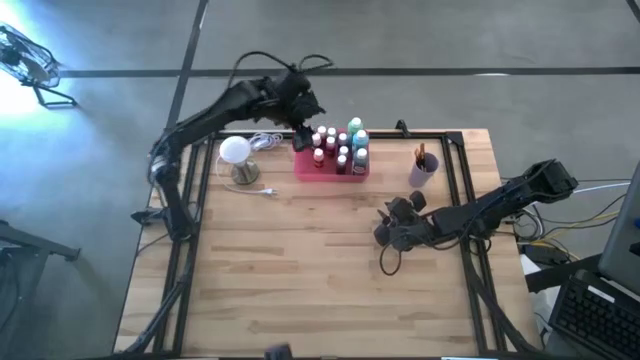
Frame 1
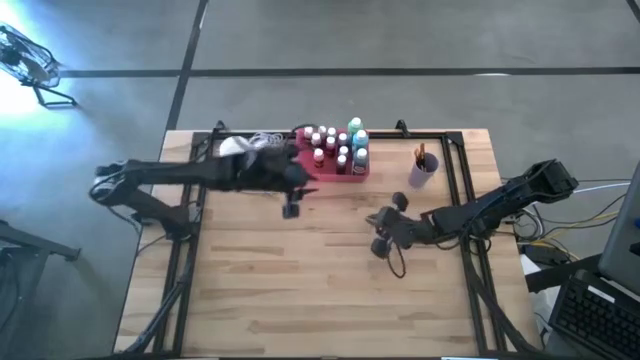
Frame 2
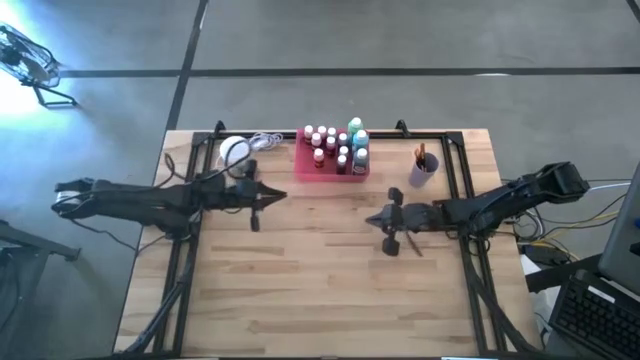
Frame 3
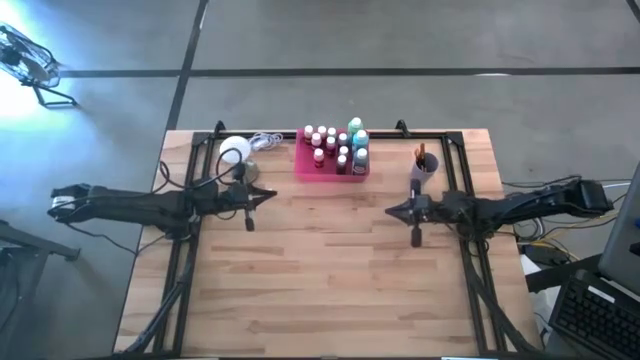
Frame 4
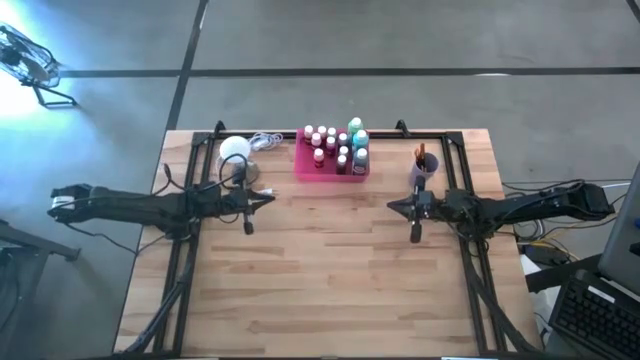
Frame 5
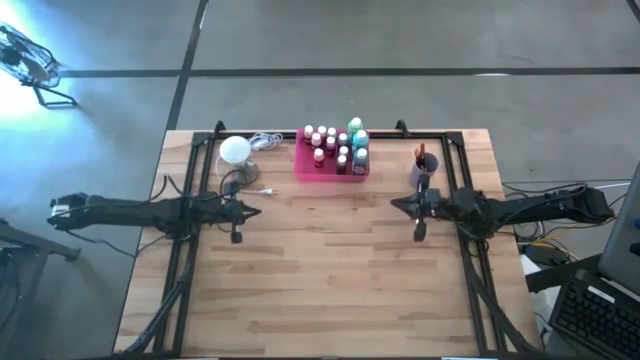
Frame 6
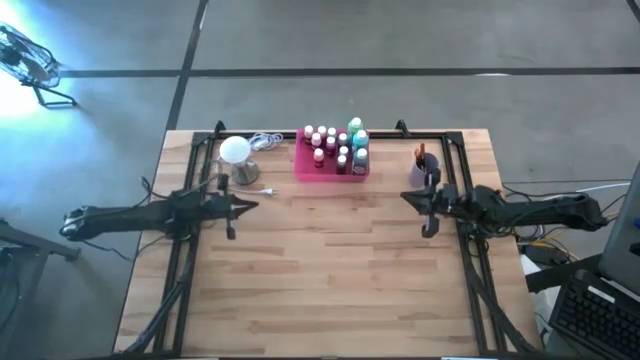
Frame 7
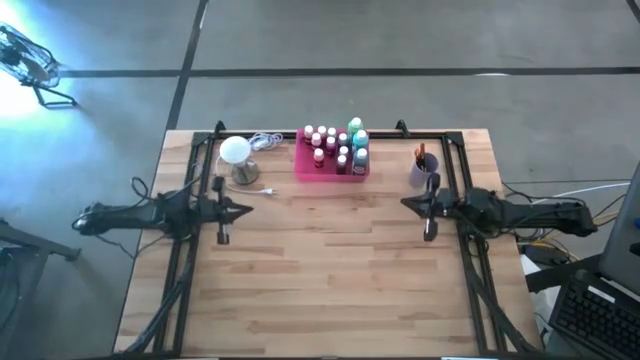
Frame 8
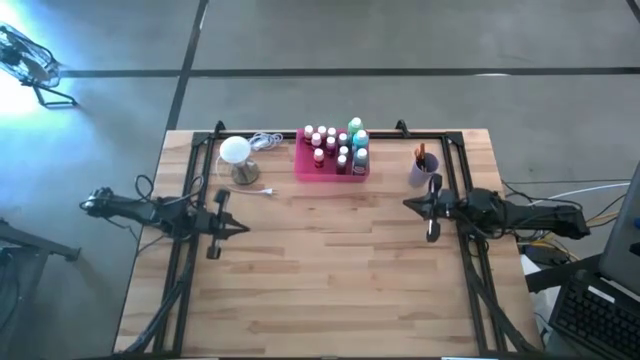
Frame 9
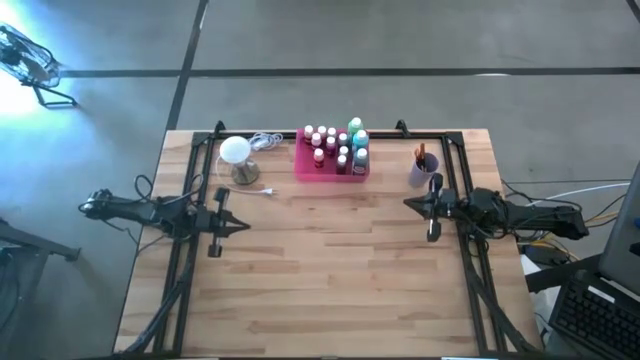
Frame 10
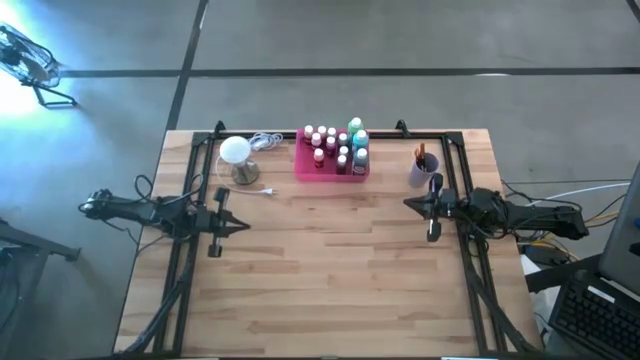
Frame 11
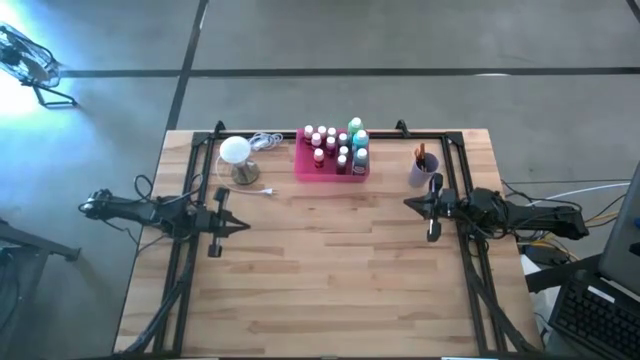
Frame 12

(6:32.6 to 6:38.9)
Task: Pick & Place Paint Supplies
Return to Home Position

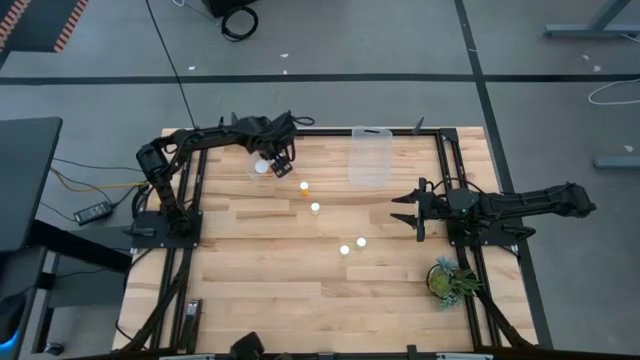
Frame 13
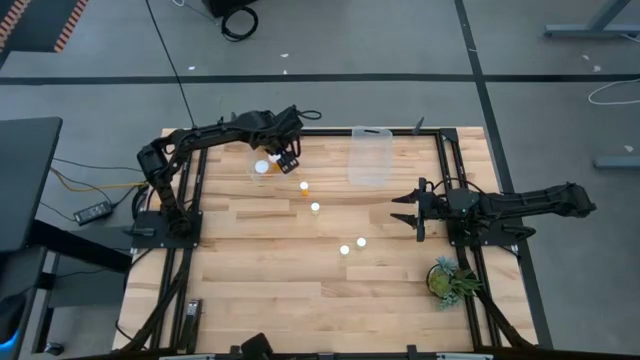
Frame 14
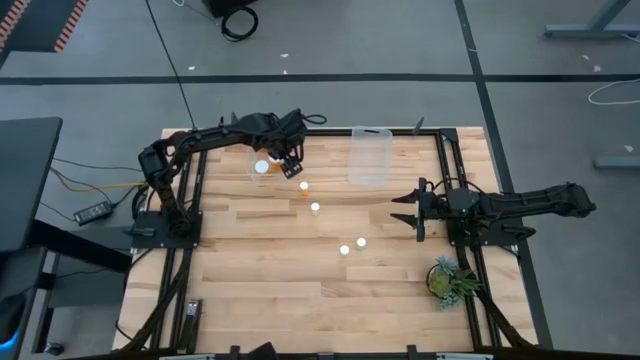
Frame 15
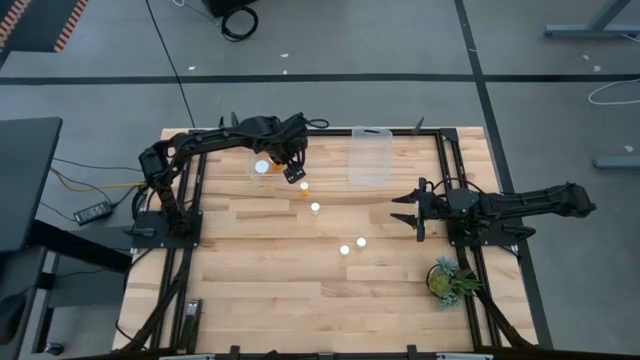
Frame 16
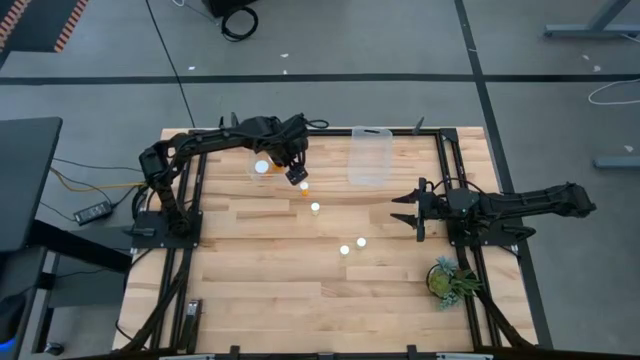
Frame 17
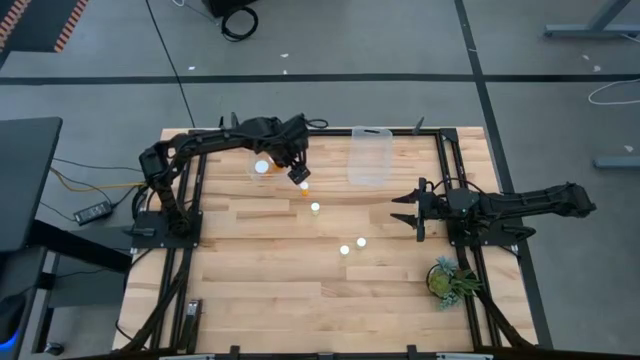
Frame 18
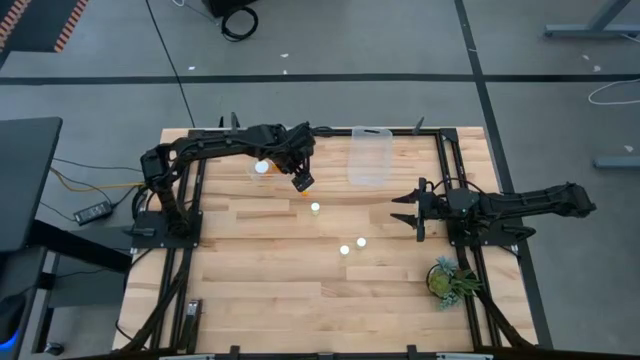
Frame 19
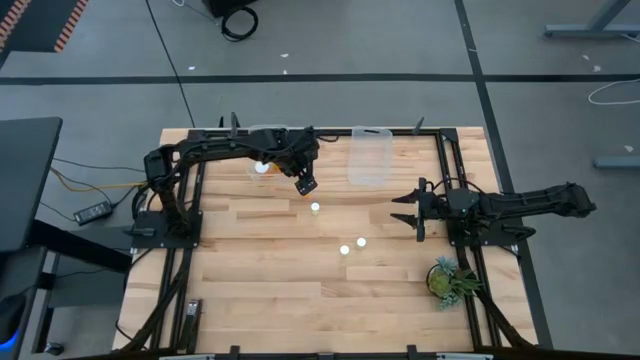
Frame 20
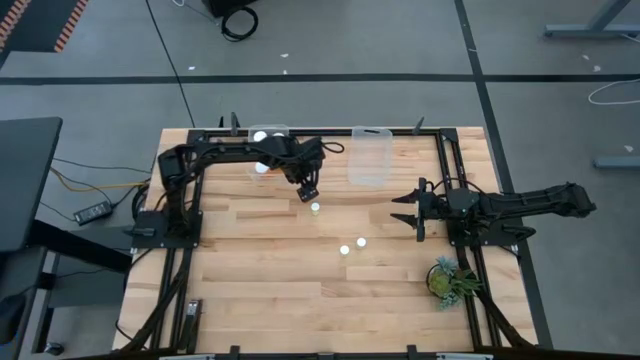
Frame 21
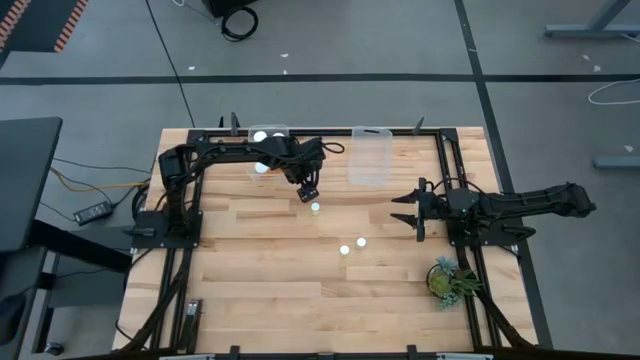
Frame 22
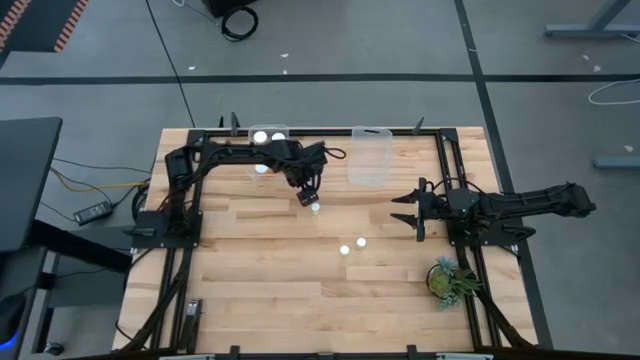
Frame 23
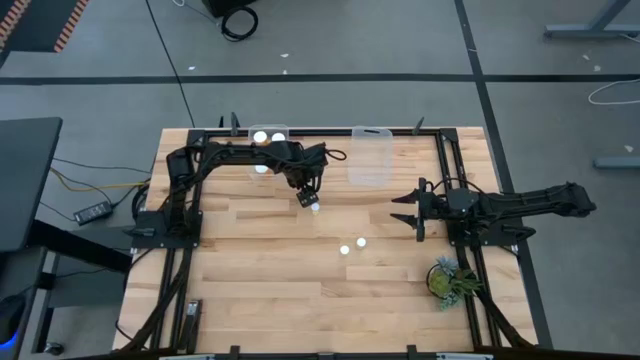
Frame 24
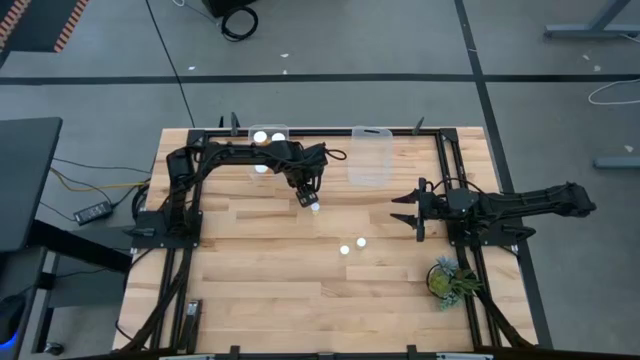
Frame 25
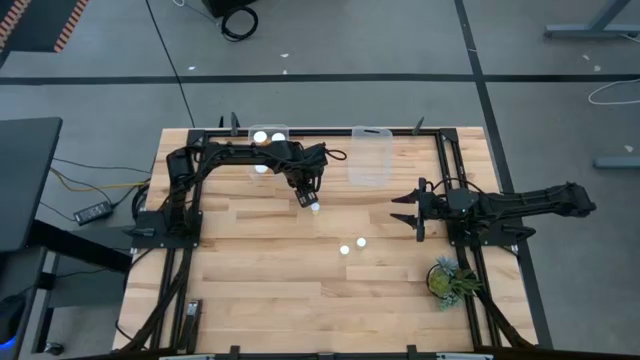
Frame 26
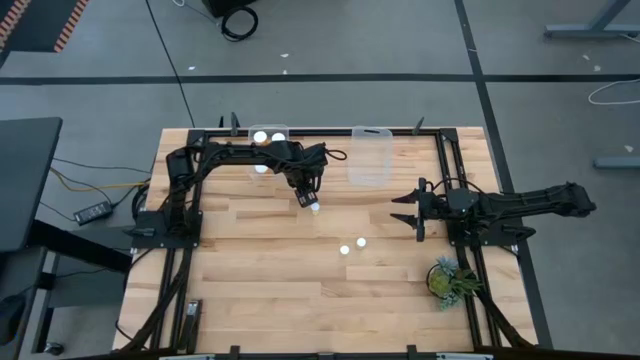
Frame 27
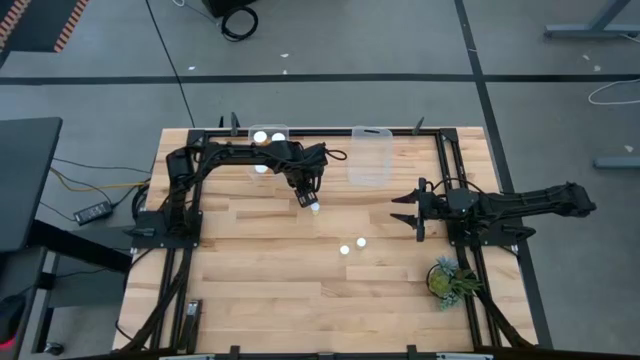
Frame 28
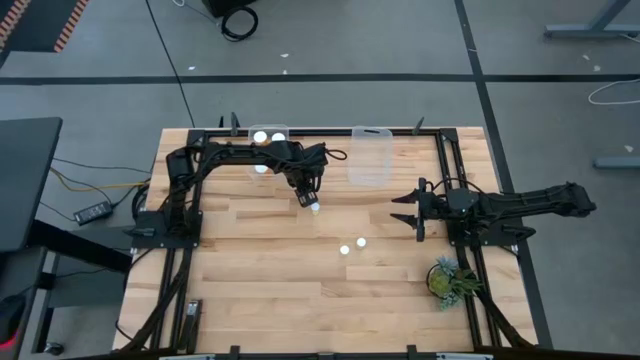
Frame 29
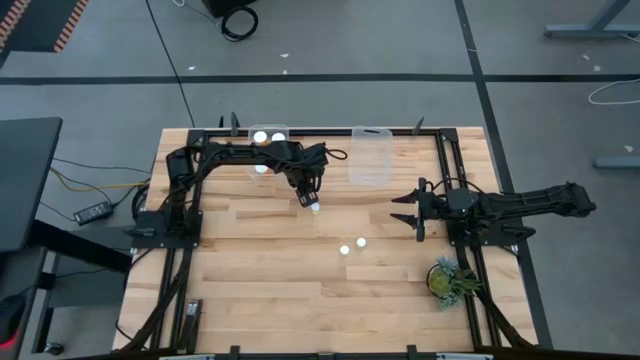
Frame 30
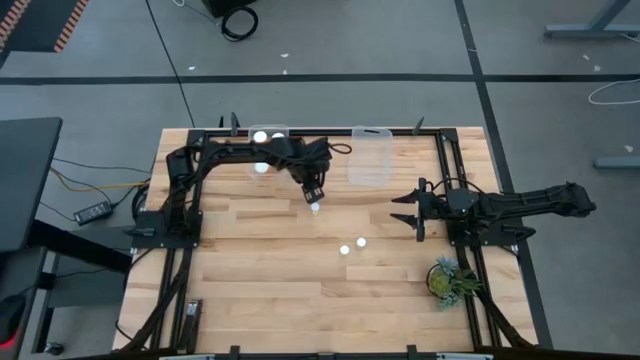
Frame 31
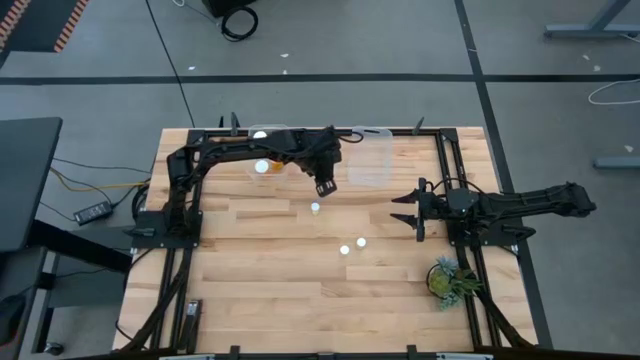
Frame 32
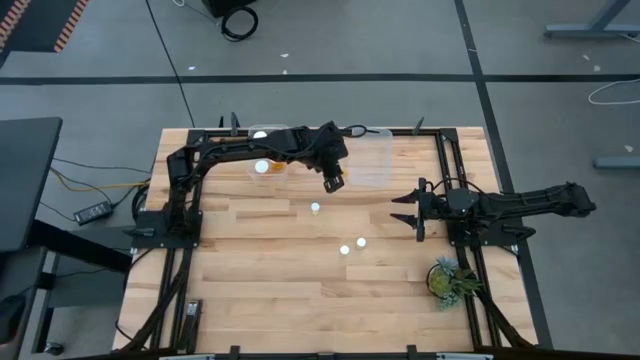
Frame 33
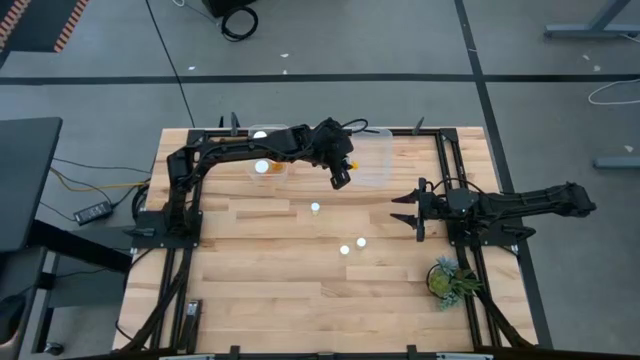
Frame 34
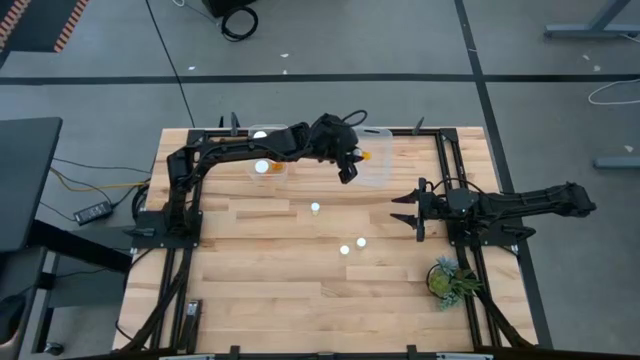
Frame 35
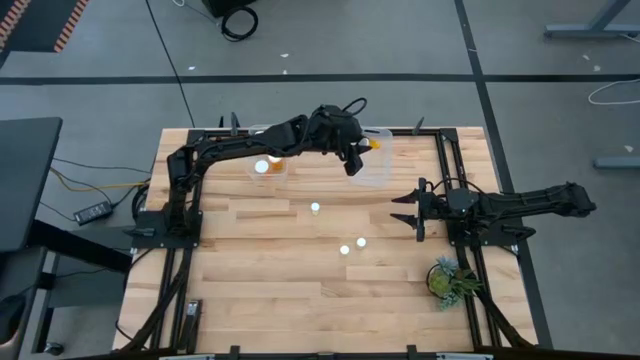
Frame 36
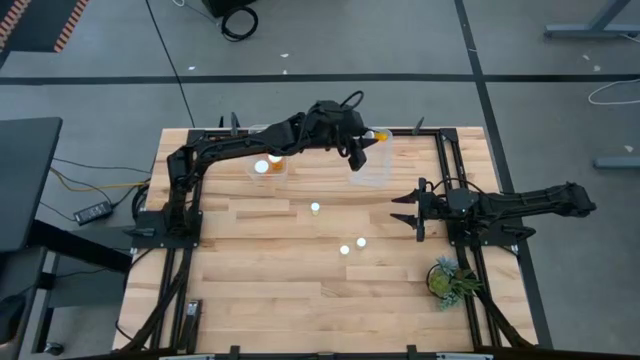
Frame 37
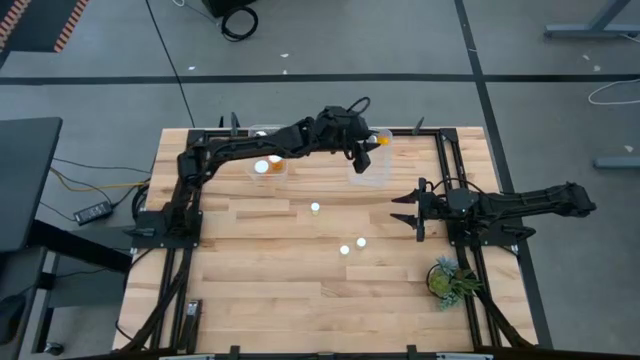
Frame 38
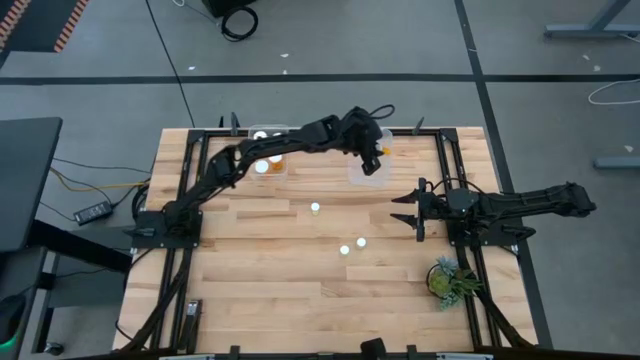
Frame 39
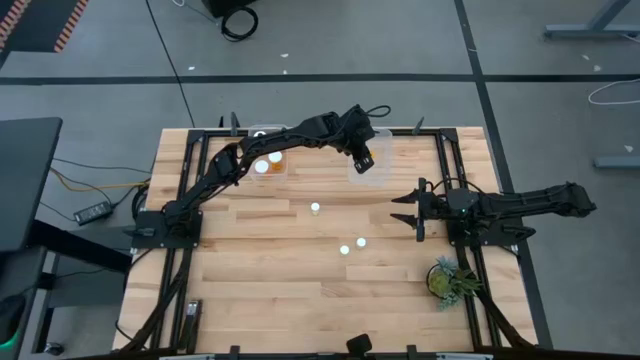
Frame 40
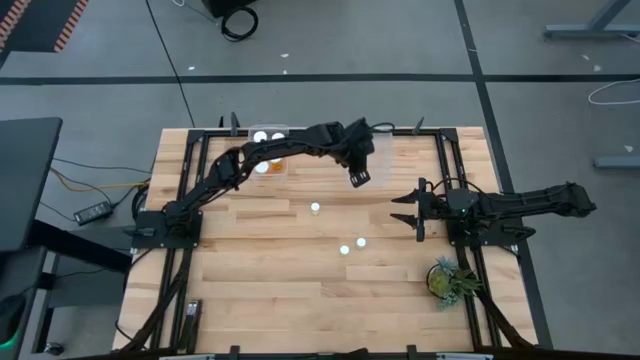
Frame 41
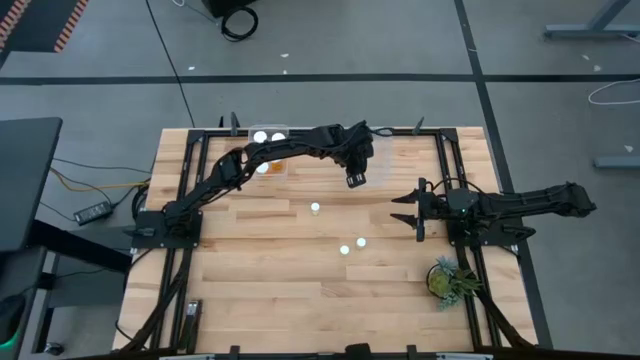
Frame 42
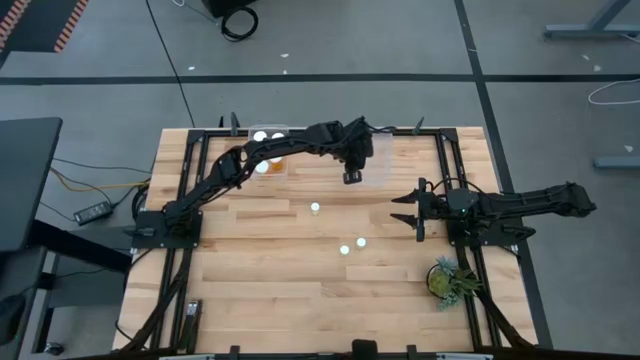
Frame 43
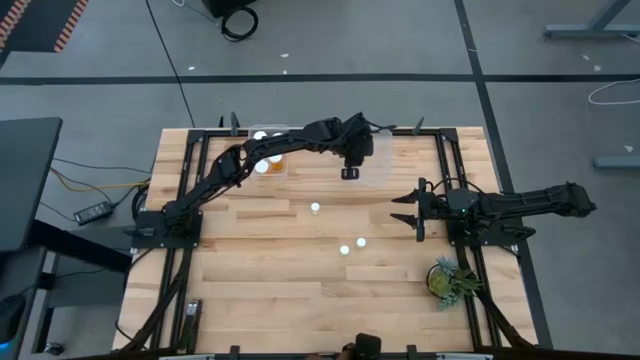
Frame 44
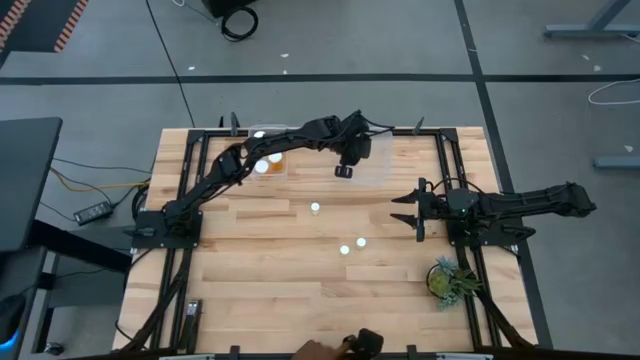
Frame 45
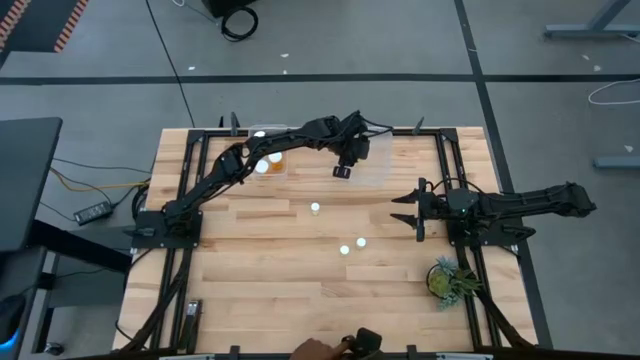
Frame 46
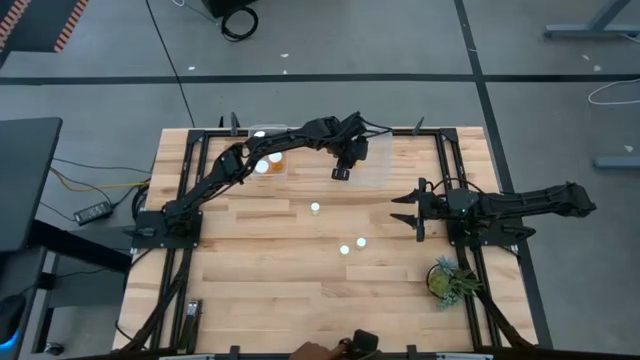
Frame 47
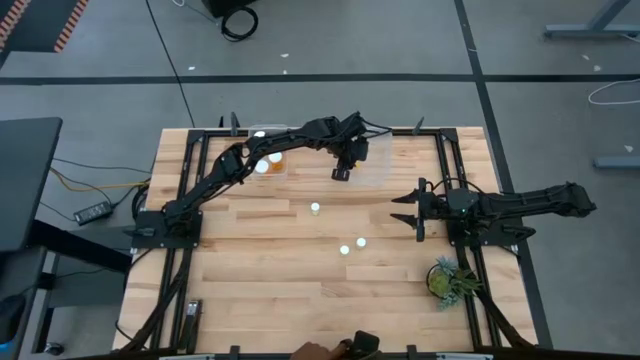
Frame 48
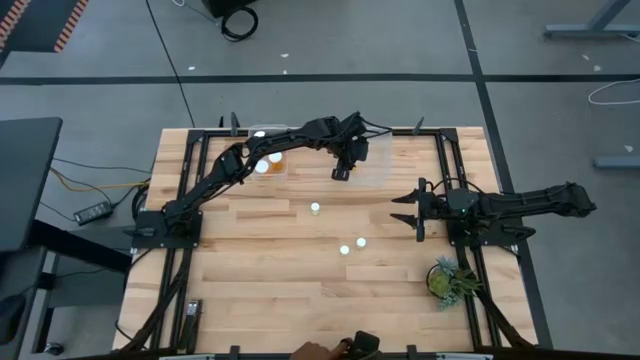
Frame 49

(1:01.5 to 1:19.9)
Task: Pick and place medicine bottles into bin by pill shape (circle, oval)
Put the orange tablet bottle into the right transparent bin
